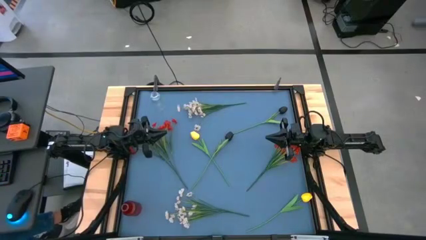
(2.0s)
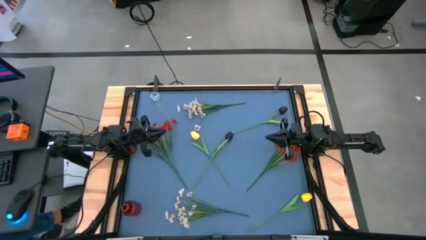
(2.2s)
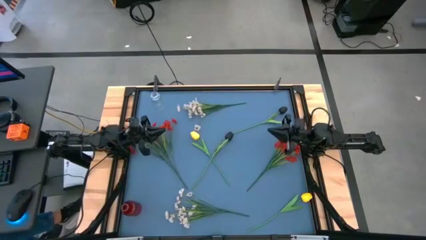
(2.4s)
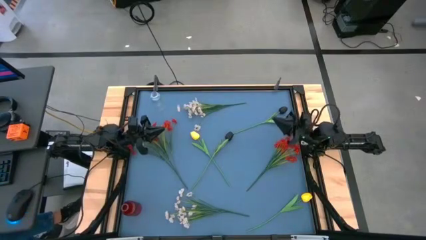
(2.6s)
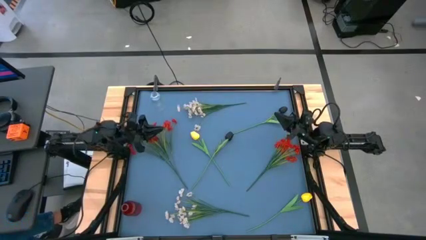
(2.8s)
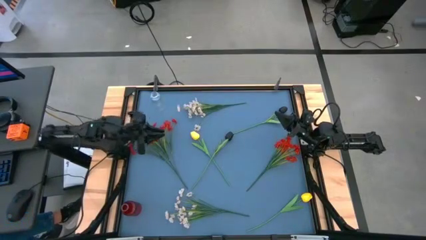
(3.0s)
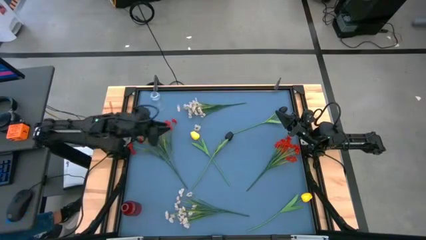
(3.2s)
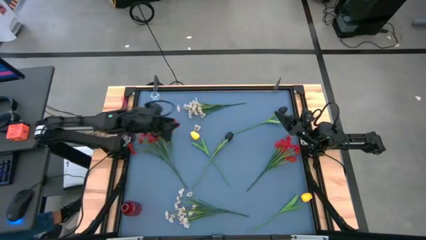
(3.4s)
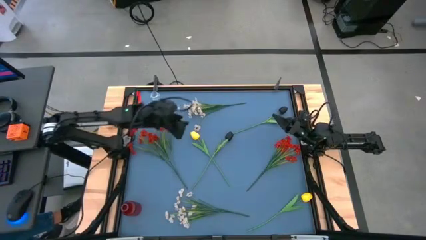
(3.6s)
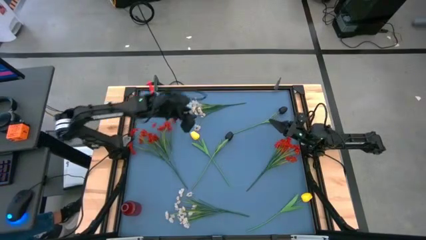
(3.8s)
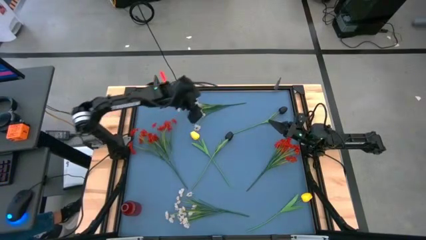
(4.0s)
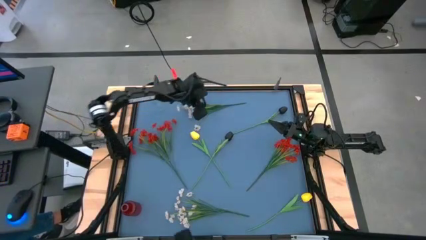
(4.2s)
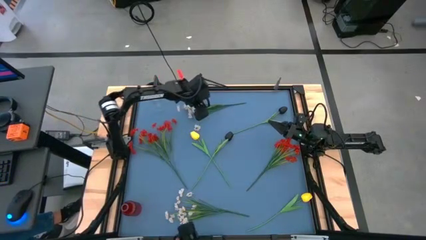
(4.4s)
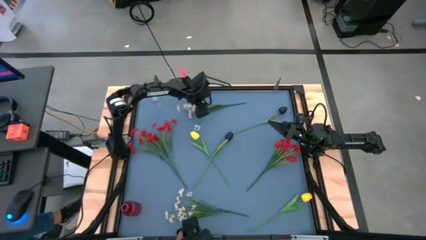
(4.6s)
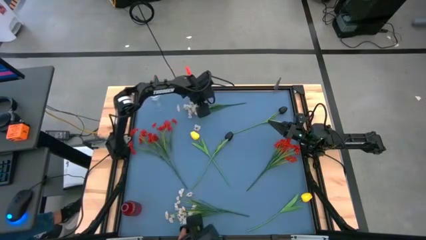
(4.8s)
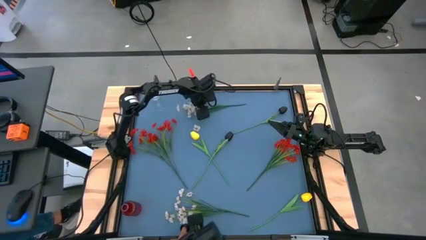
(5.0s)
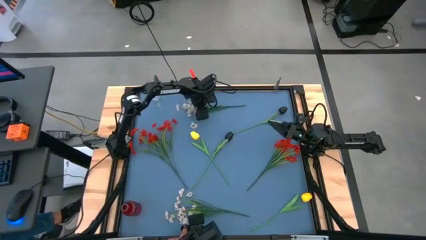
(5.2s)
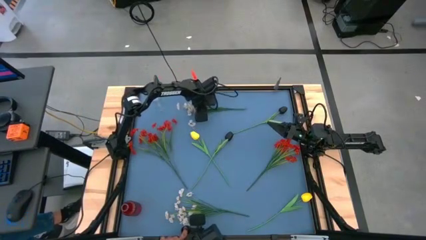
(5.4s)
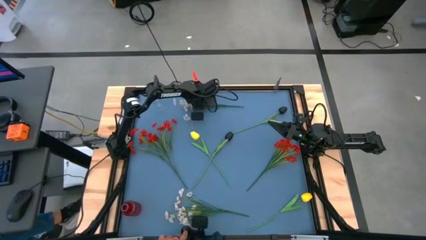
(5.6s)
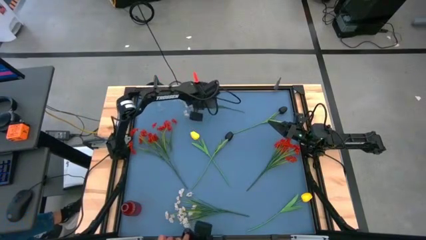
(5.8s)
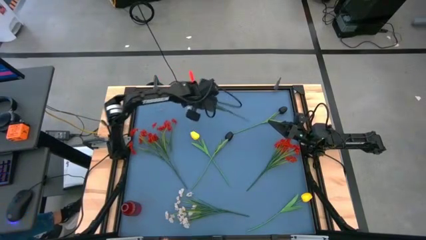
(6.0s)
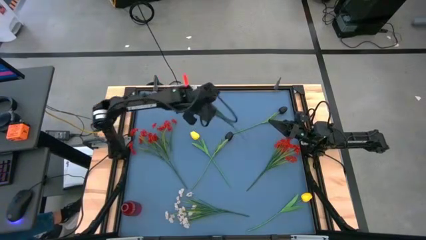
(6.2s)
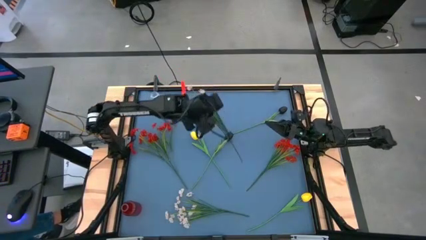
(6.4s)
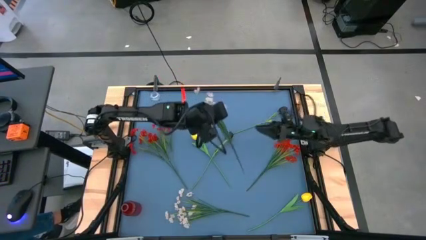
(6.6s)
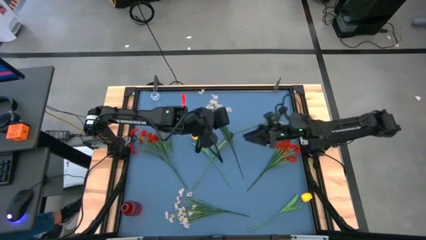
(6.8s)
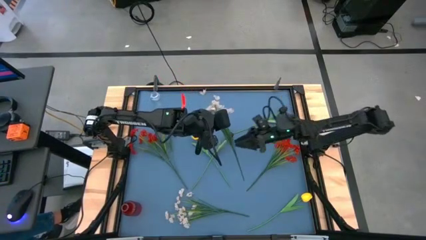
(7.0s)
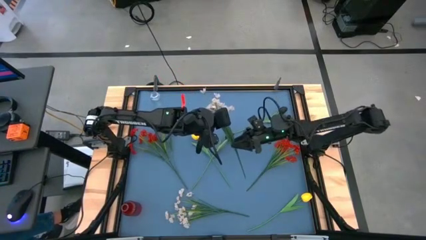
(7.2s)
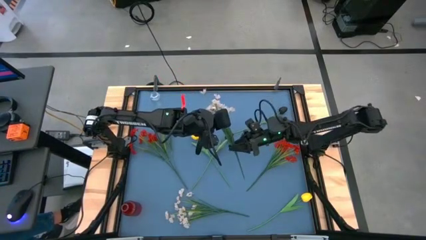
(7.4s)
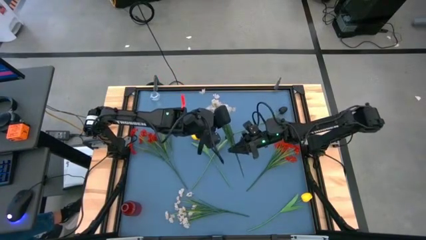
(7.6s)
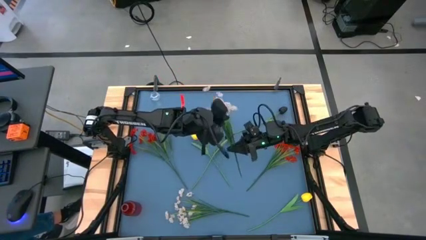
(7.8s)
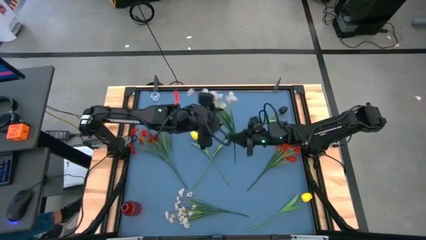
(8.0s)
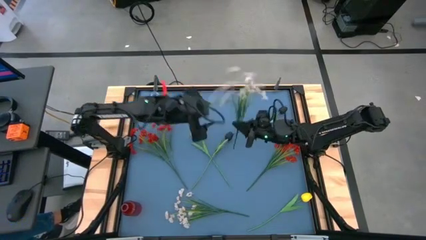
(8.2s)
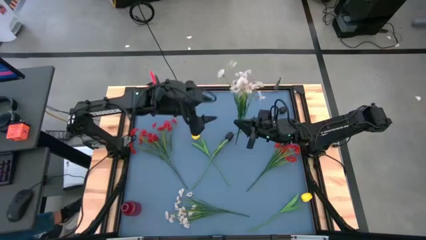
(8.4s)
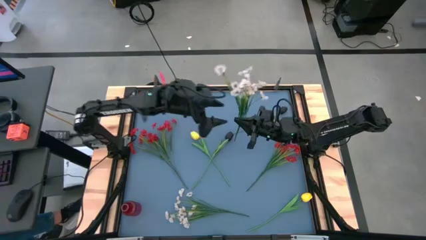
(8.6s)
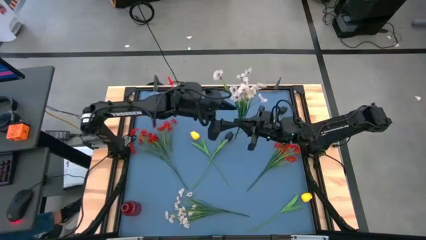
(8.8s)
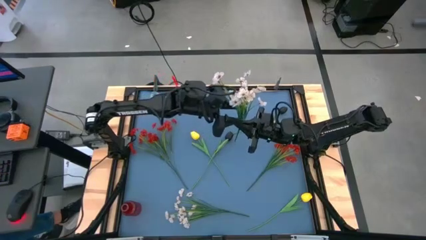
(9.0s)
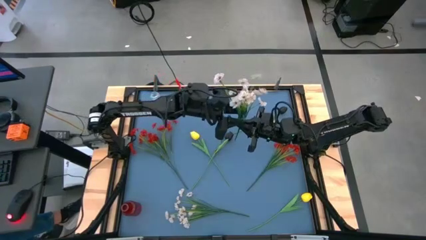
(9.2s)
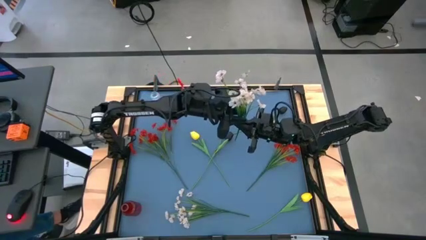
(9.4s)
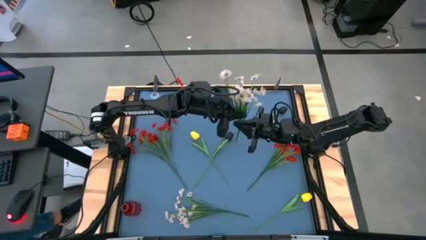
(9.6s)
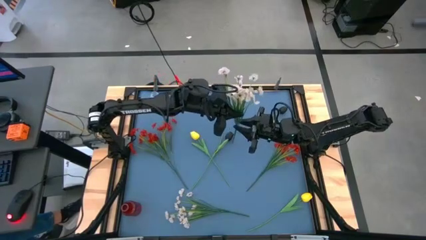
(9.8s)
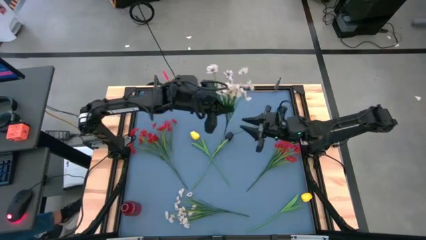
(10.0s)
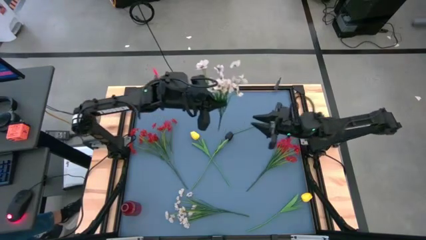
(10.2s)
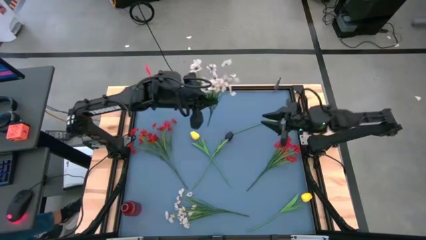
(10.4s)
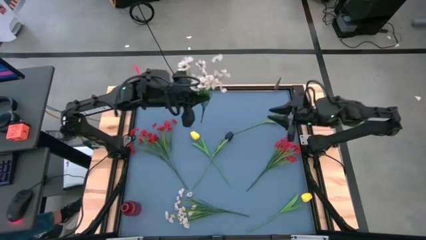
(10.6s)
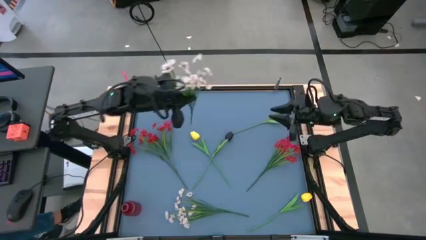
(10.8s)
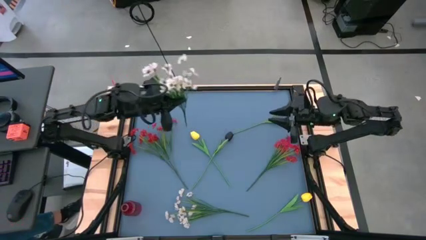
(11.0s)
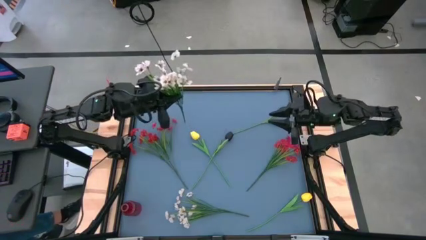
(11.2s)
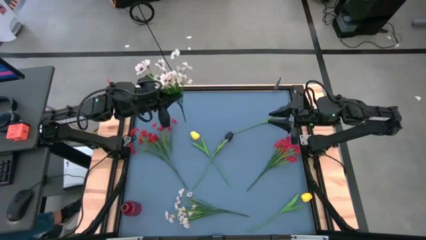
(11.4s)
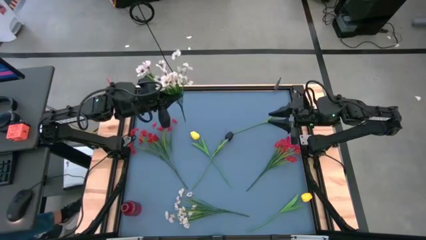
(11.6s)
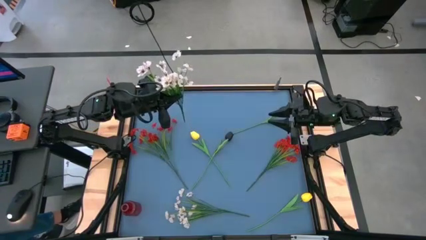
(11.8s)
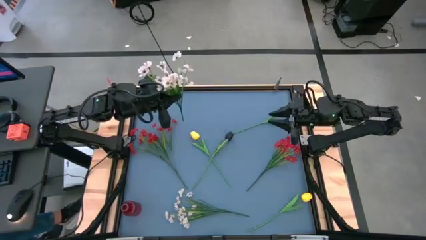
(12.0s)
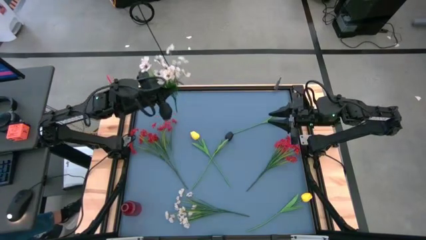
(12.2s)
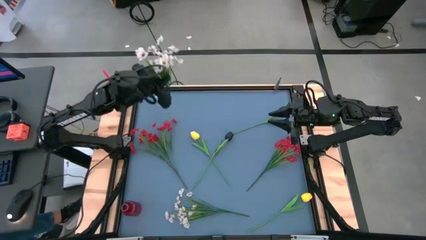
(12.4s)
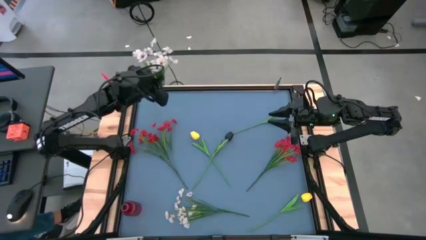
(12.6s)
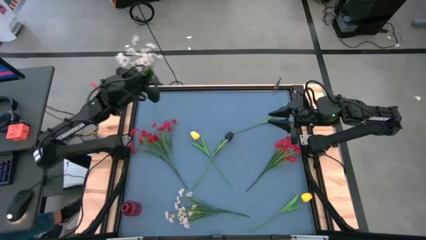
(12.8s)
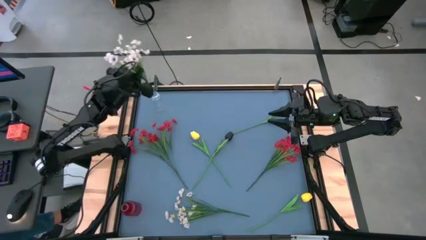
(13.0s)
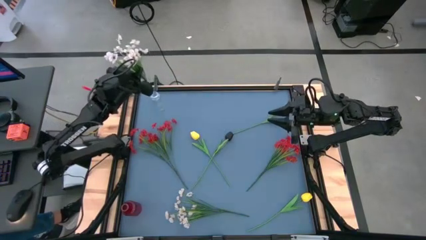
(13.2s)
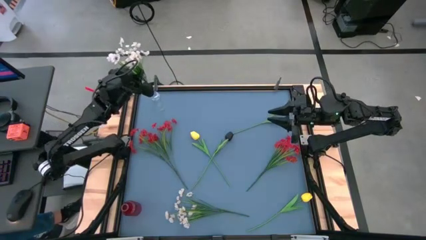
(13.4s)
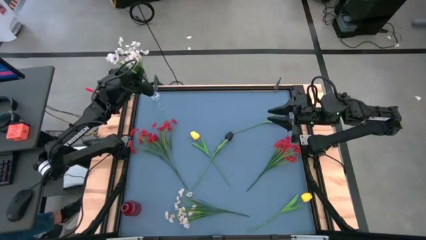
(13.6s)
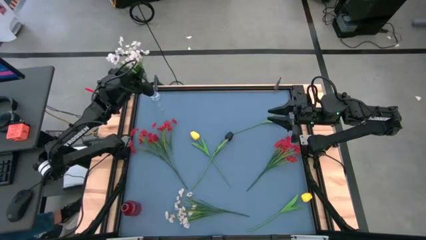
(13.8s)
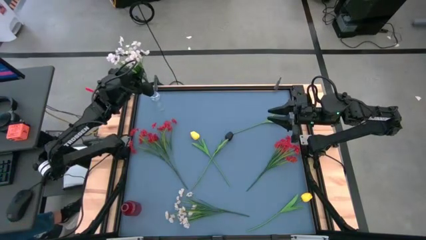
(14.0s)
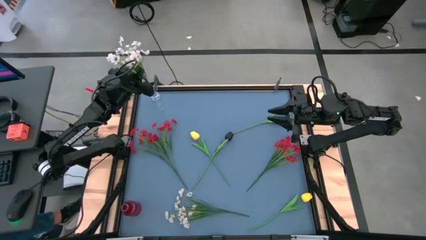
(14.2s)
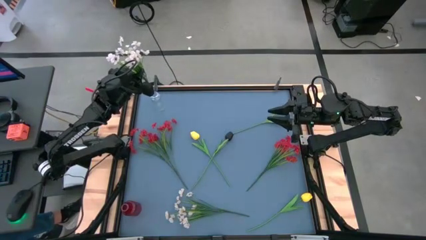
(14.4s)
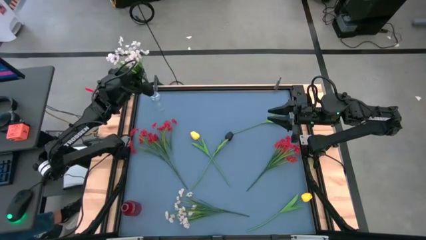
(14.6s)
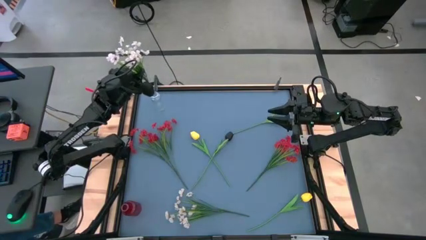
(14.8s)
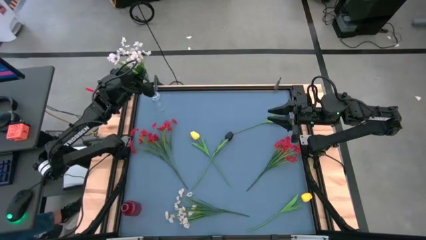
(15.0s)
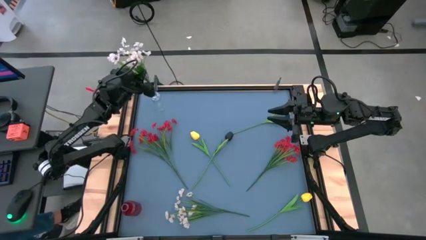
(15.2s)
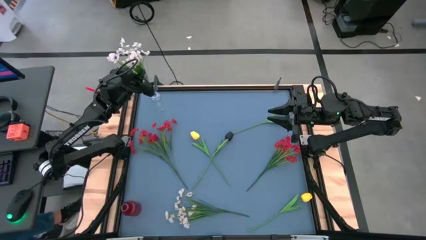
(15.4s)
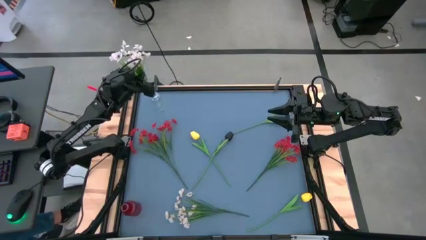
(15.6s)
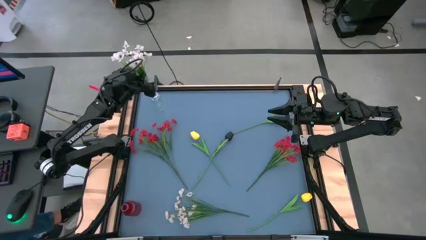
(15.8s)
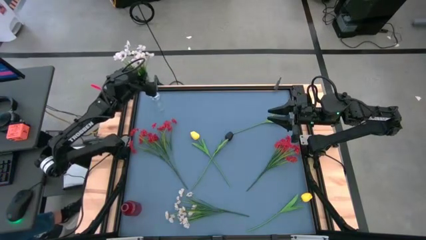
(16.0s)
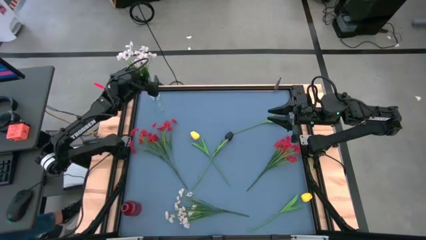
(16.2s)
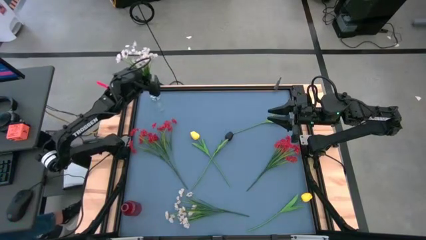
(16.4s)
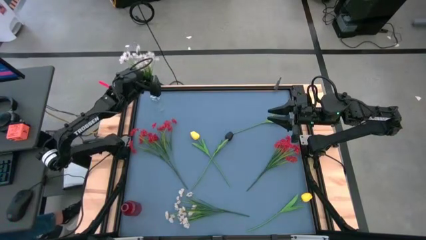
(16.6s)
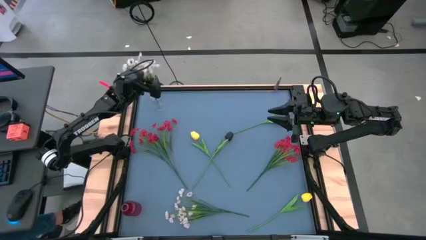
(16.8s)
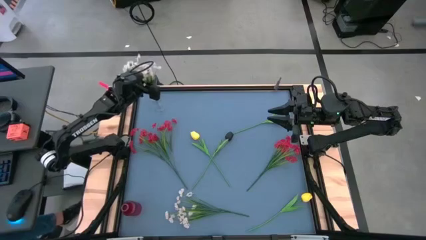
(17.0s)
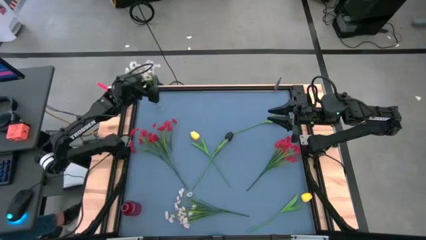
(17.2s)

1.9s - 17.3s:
Task: Sort flowers into vase by color
Put the top white flowers into the transparent vase
